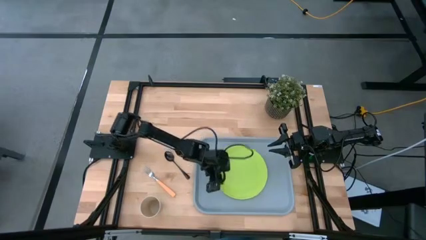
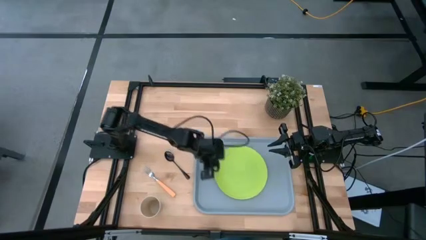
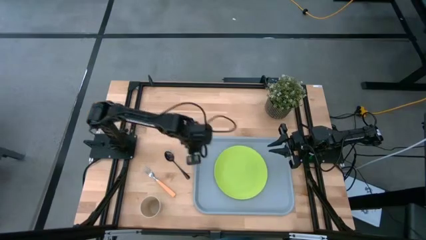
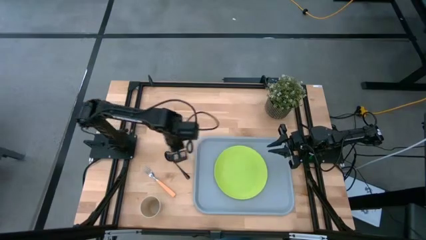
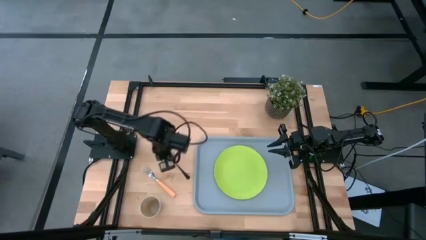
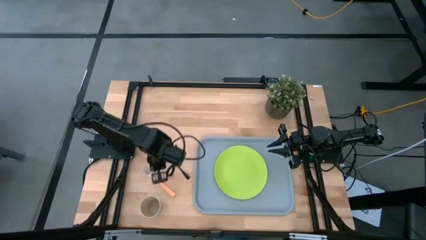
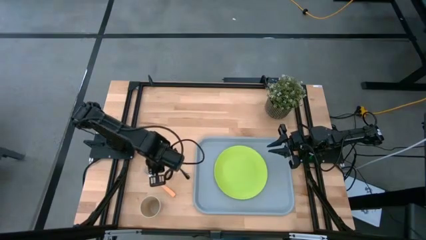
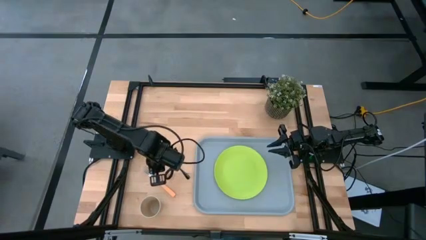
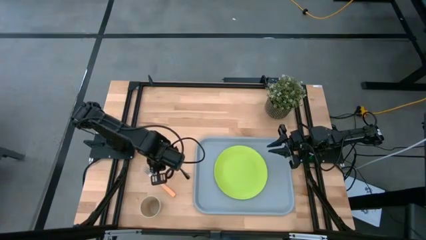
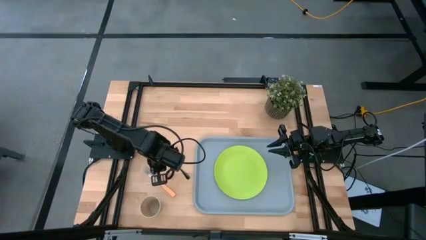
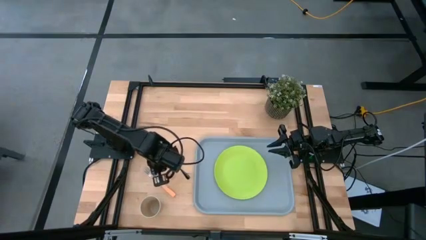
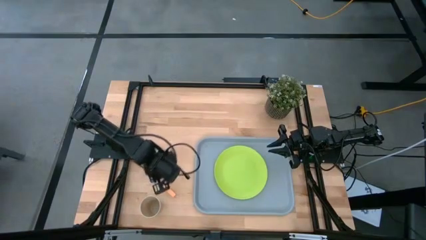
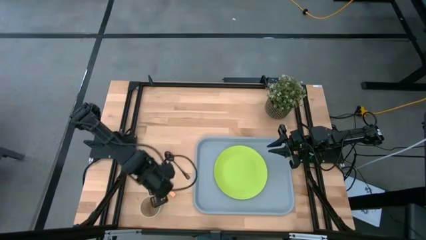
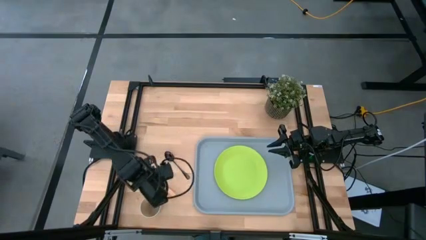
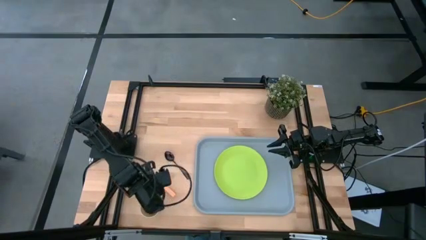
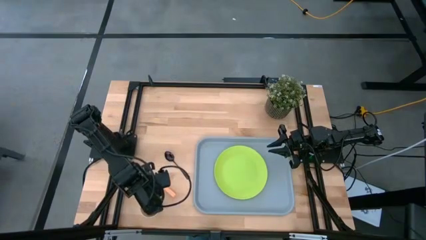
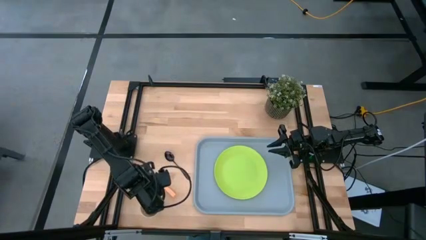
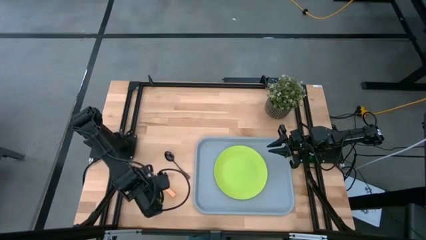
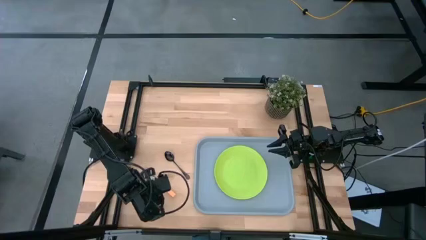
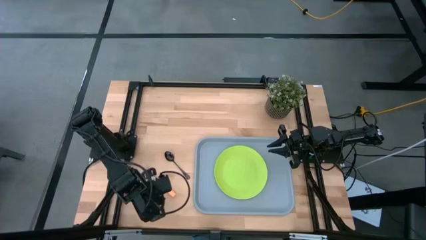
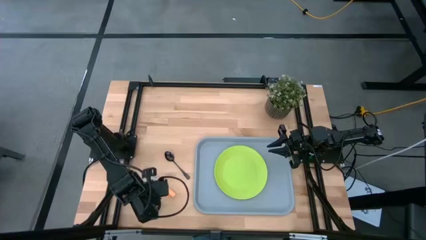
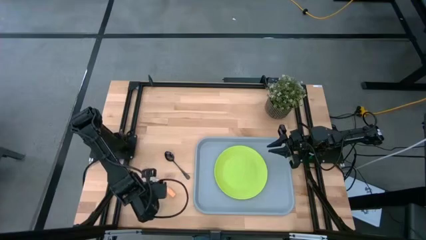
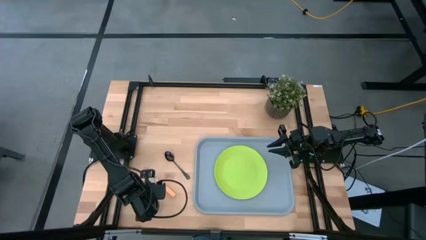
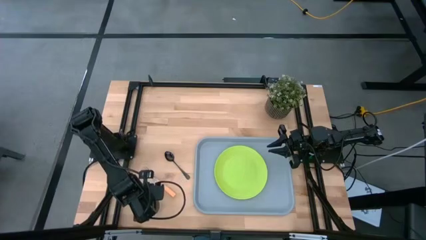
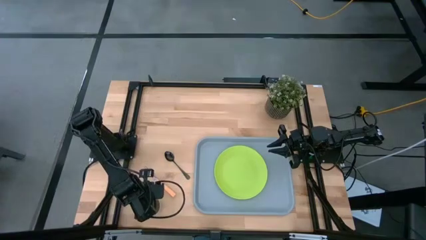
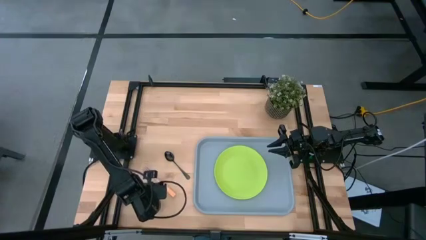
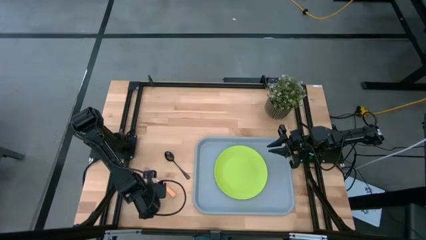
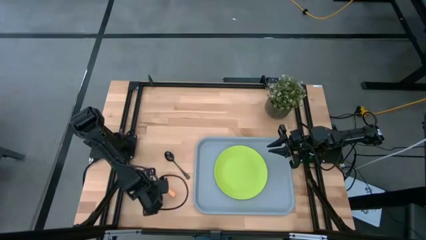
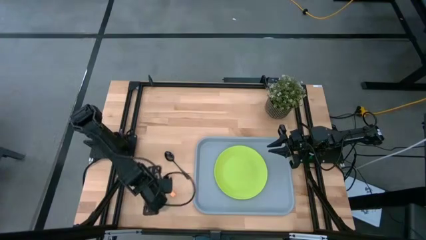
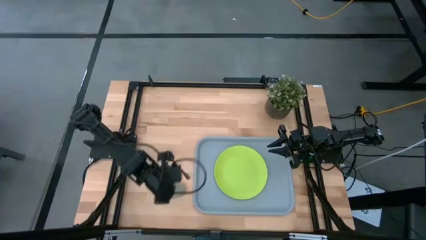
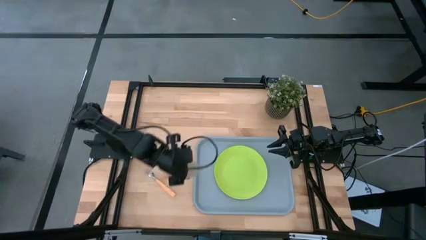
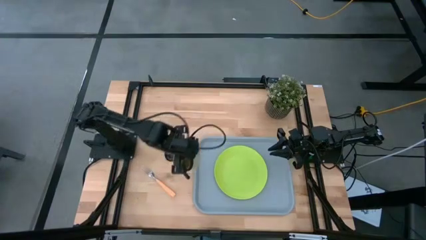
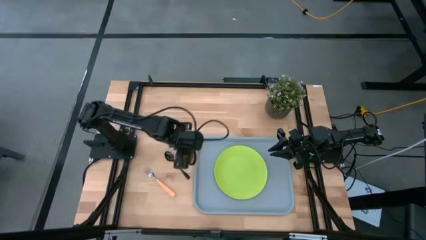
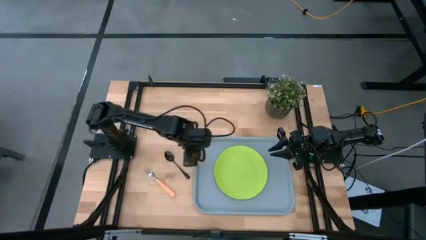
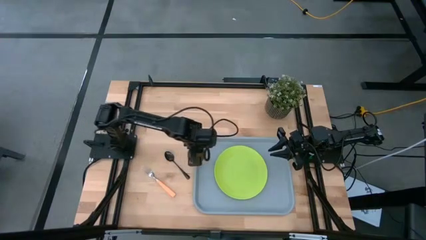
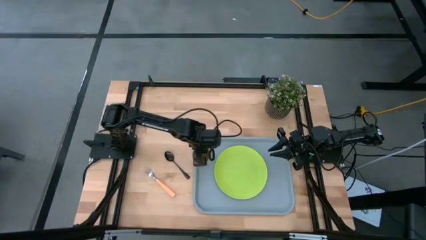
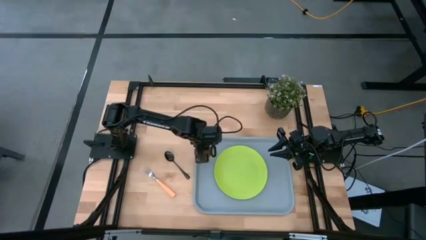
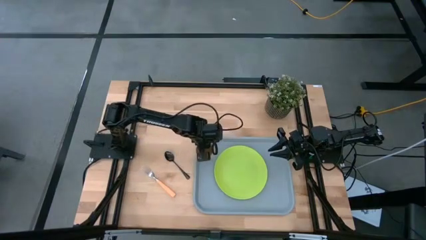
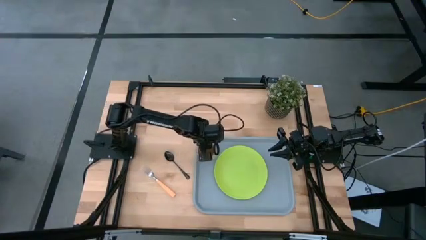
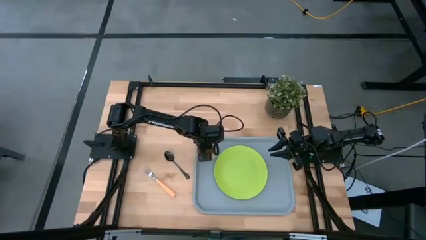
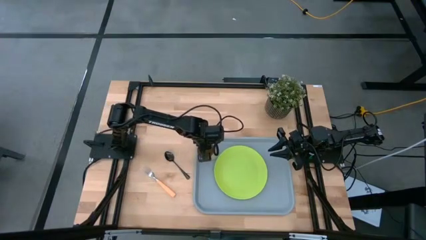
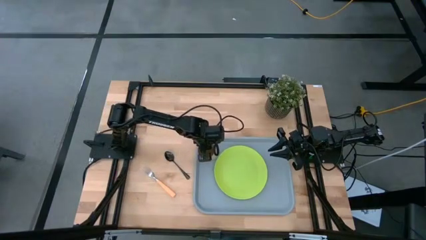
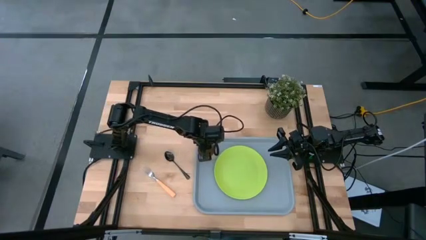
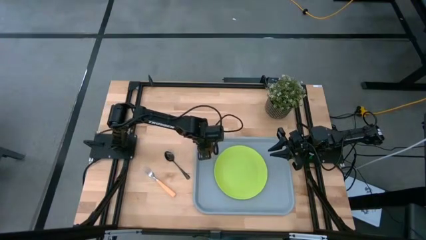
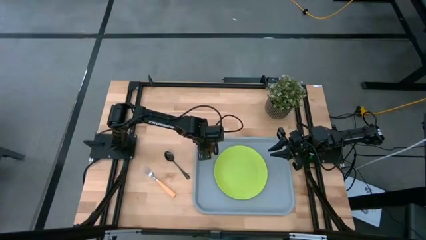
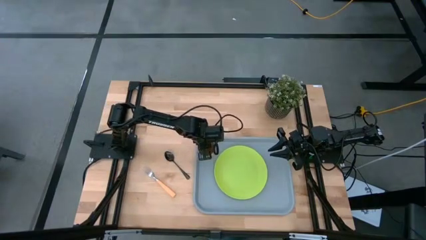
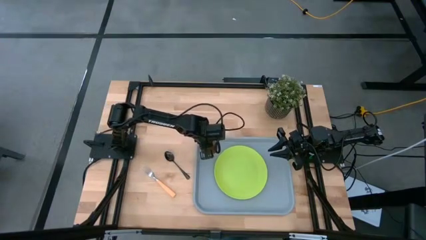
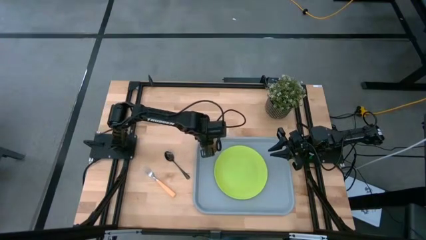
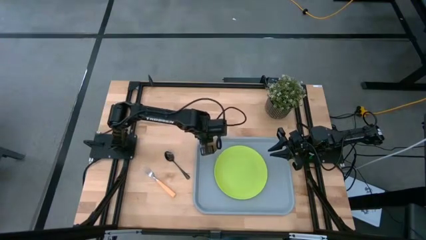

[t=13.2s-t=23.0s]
Task: Pick and place plate/cup/fork/spoon on tray
Put the pink cup on the gray serving tray to the top left of the green plate

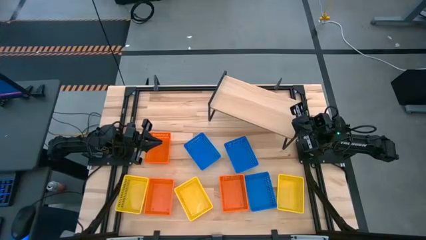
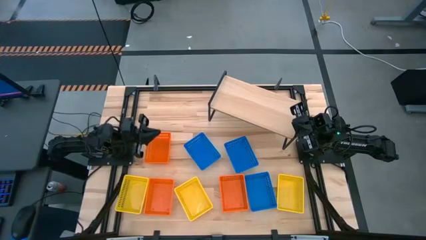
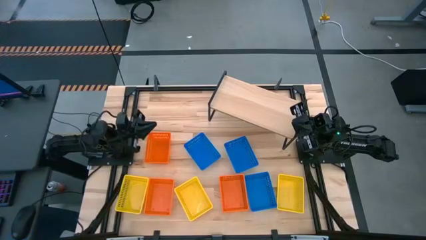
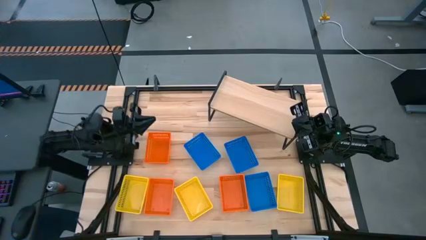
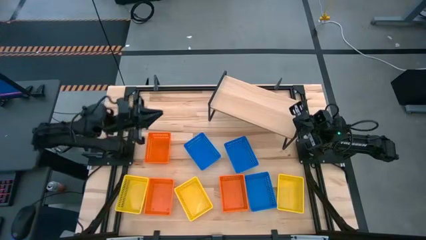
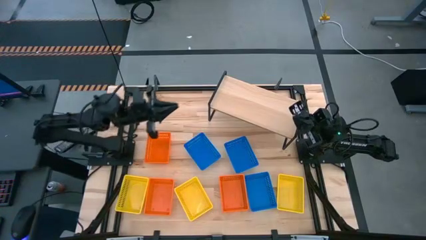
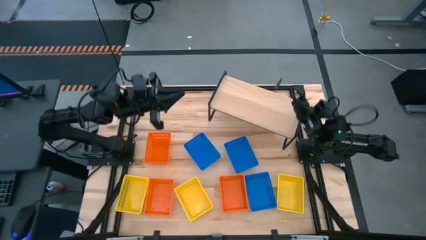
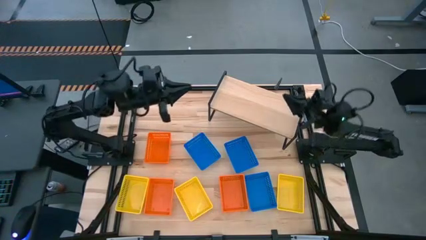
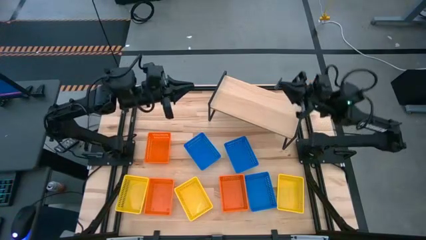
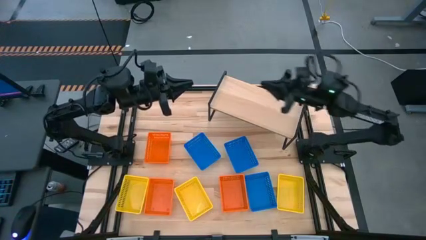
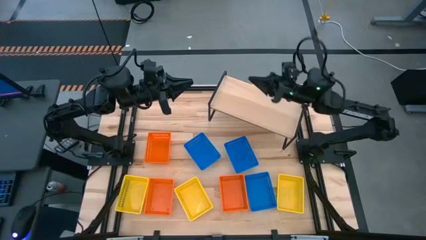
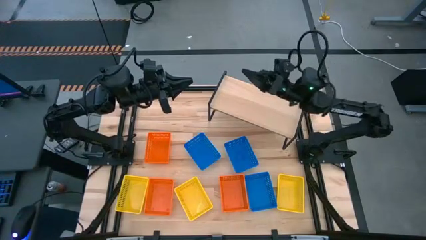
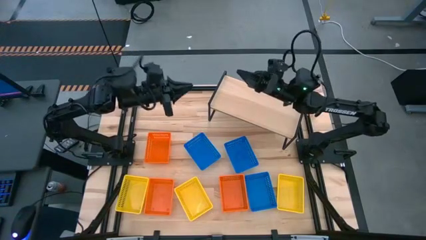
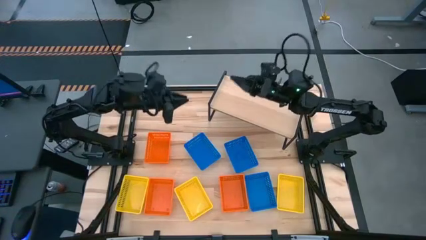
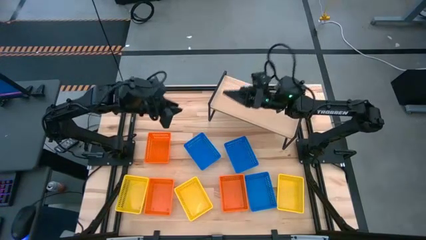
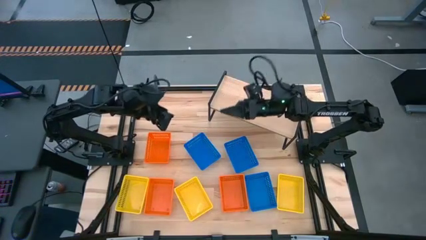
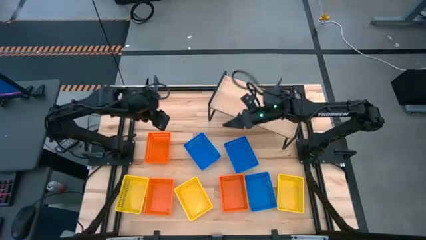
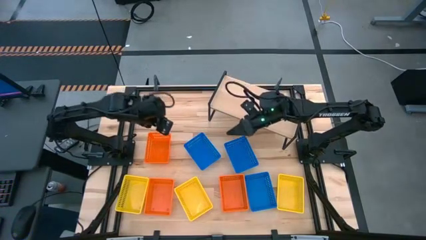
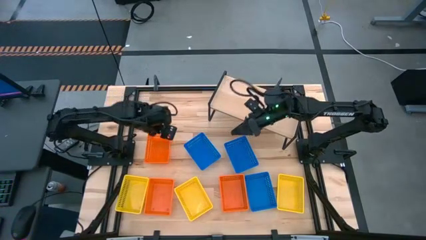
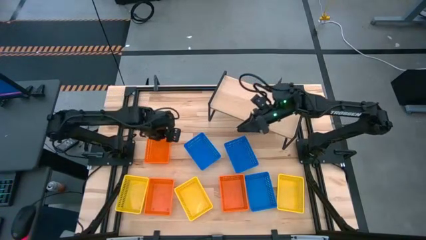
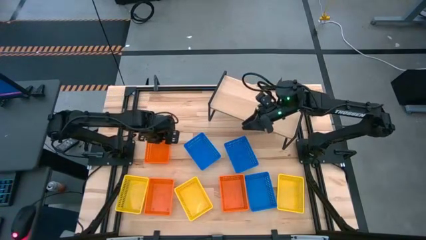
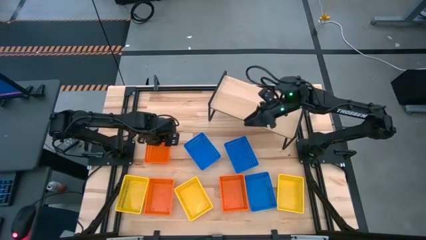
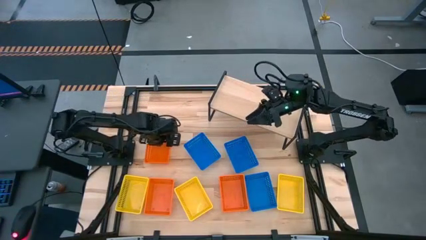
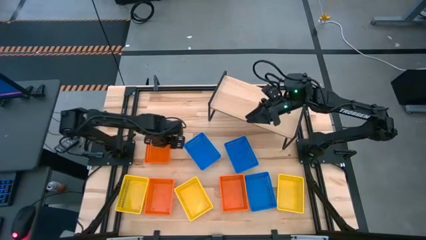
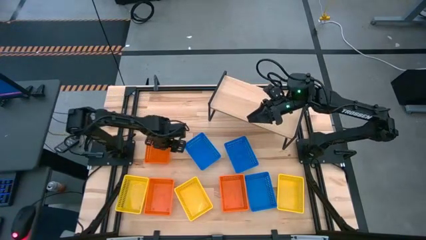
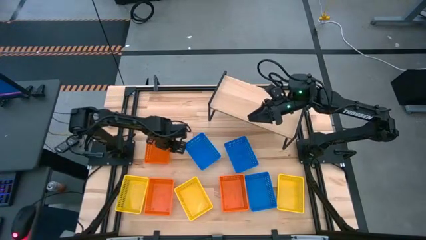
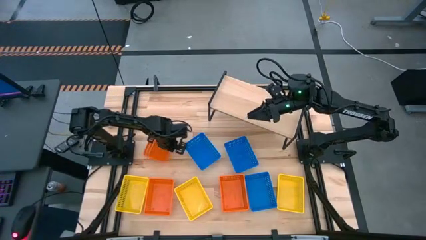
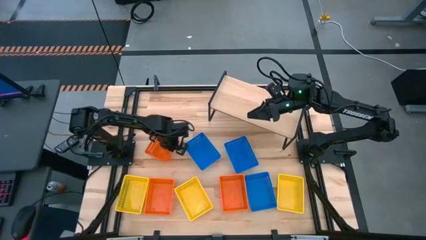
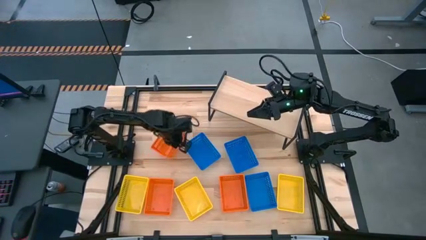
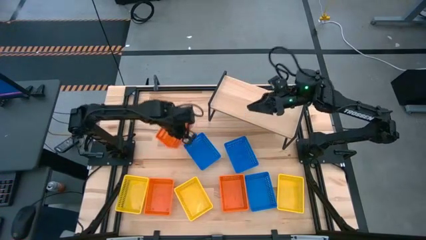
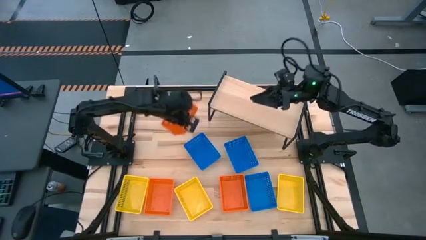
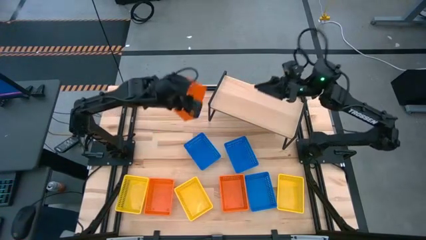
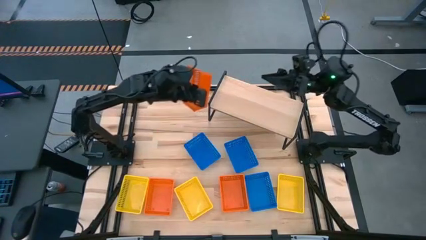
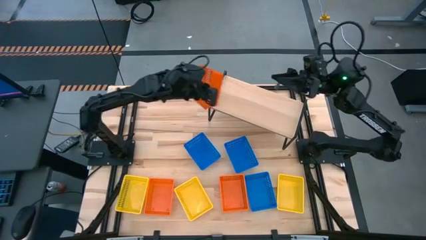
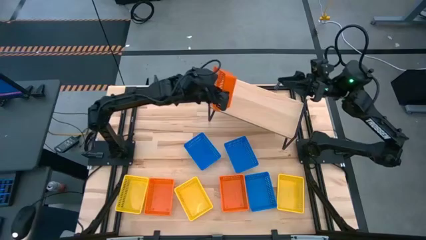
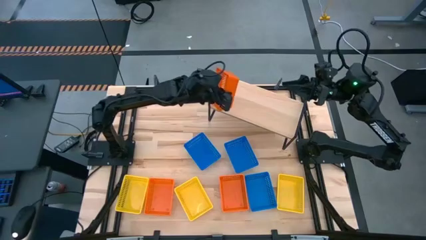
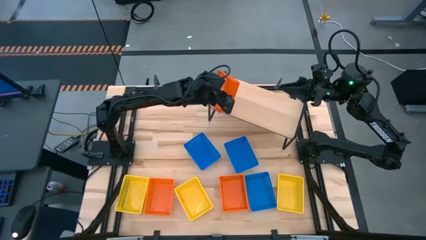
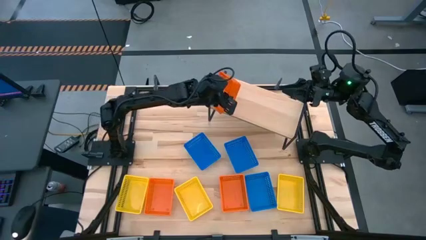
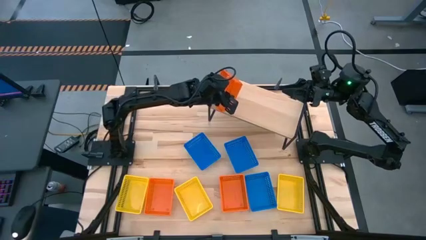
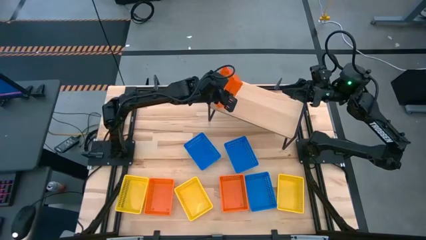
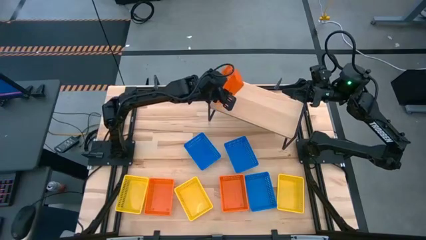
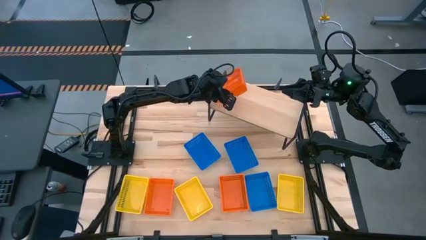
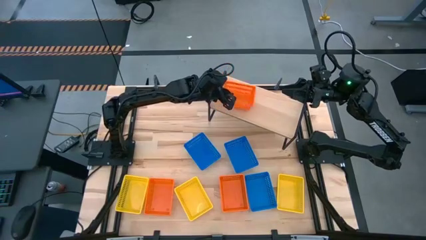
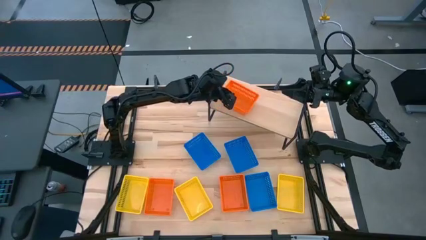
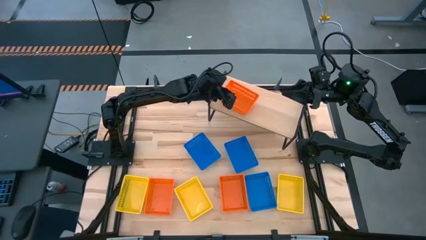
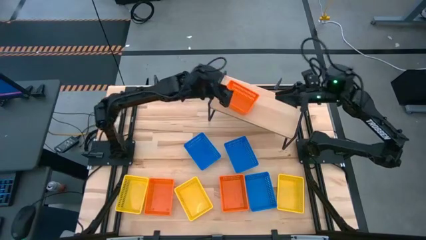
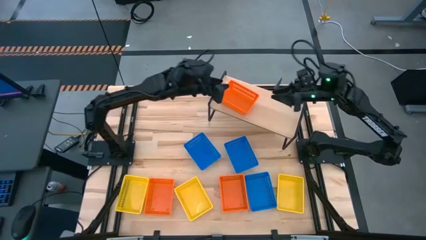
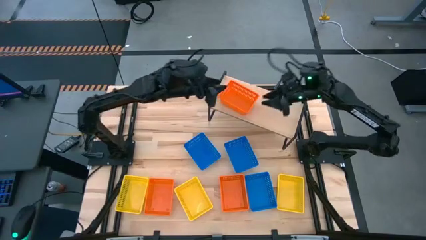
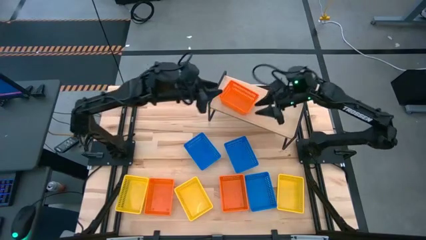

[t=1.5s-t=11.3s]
Task: Stack baskets on shelf by color
Put the top orange basket on the shelf
